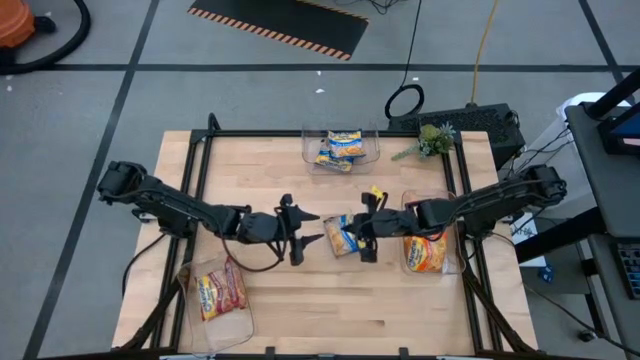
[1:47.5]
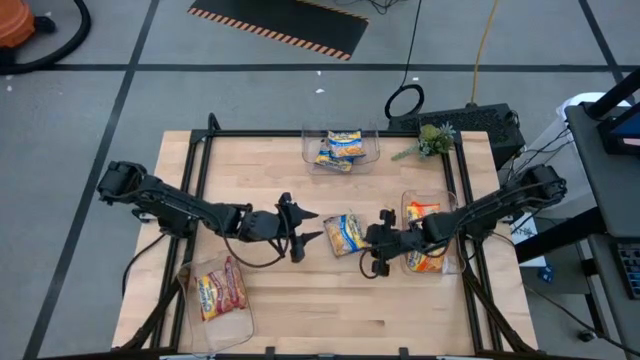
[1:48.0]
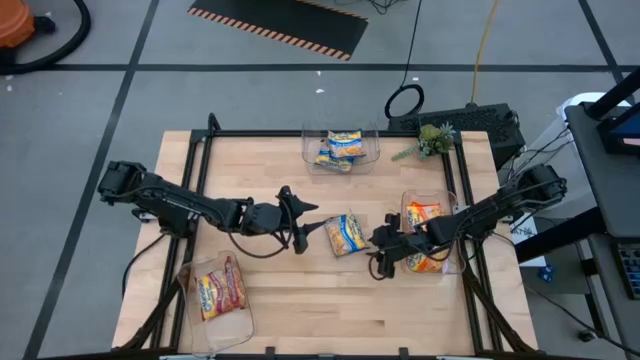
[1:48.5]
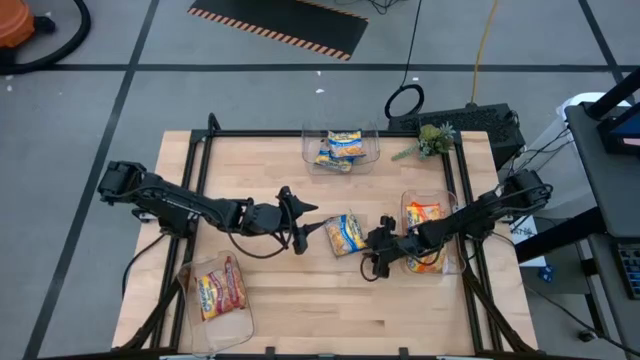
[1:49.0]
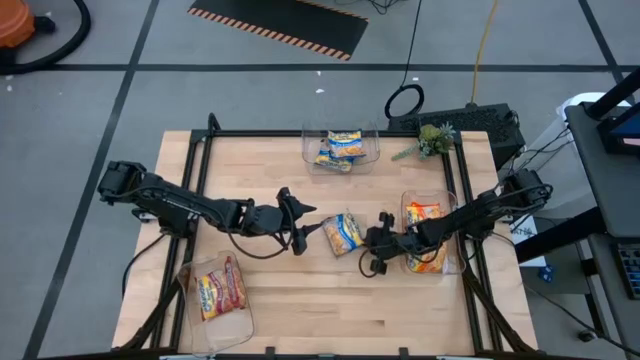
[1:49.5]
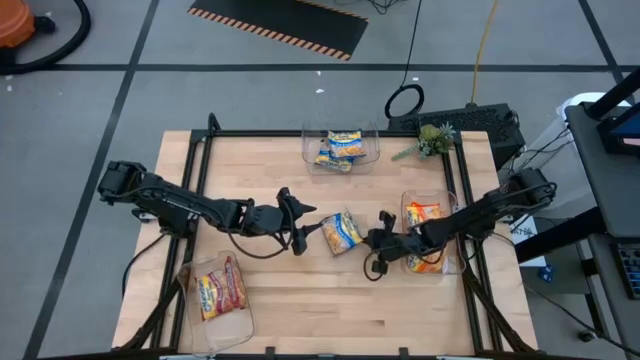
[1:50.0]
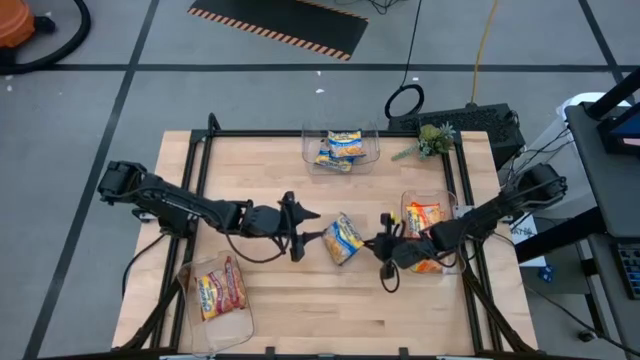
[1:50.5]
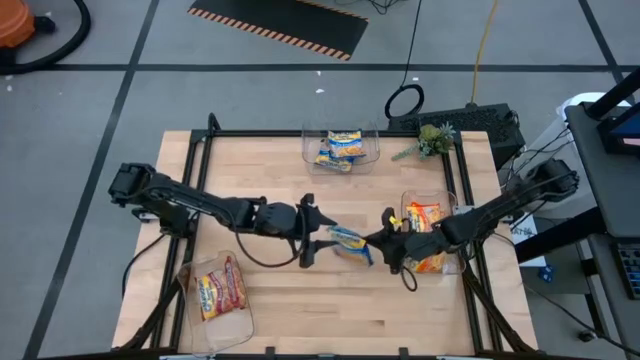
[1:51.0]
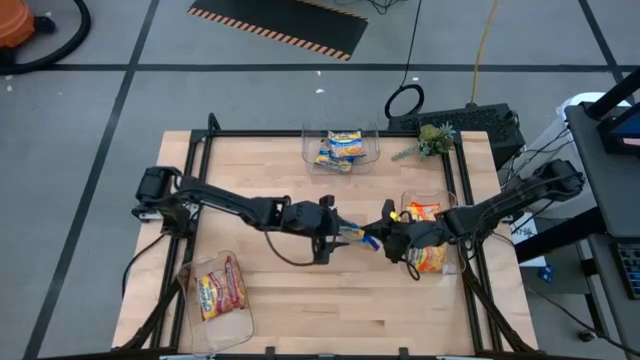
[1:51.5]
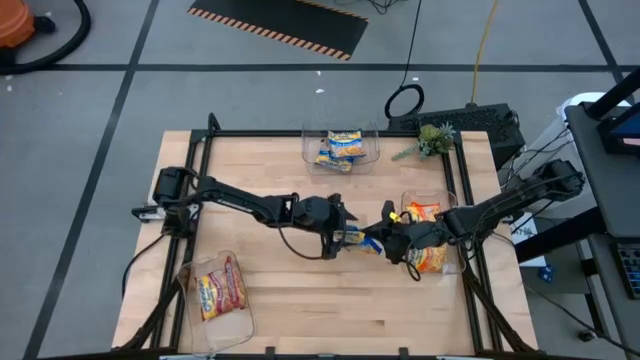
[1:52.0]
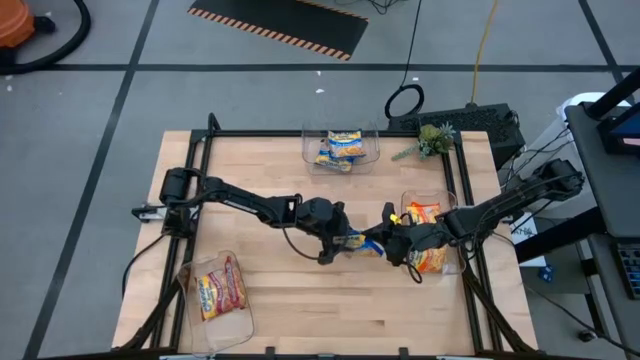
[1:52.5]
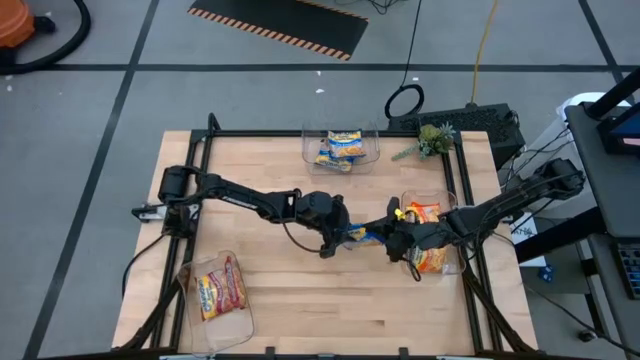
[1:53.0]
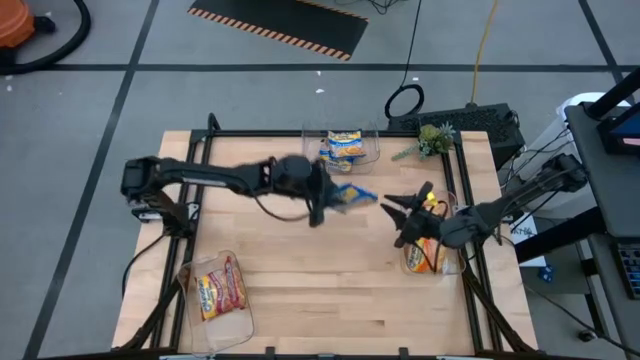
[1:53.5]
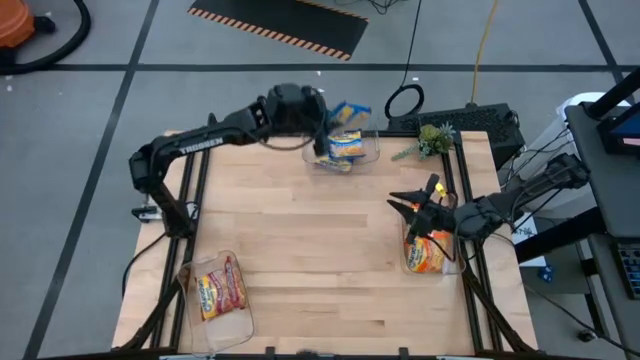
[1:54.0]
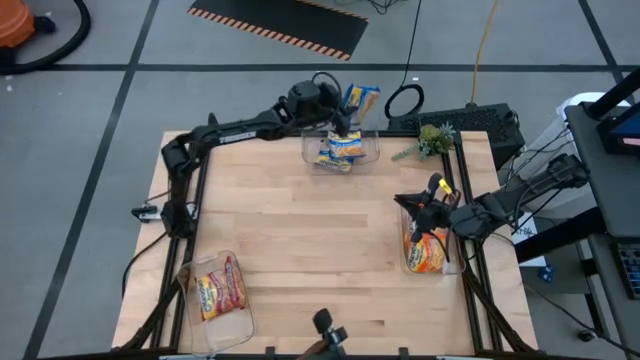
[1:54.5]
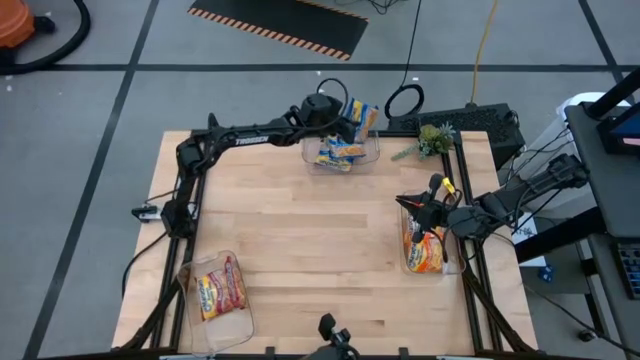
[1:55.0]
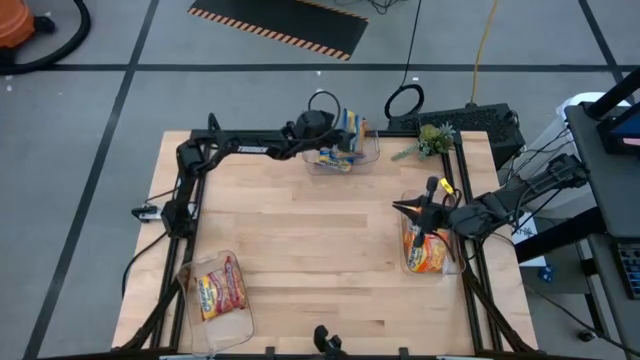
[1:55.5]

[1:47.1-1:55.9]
Task: Sort Maruchan noodles
Put the blue noodle pack into the top transparent bin

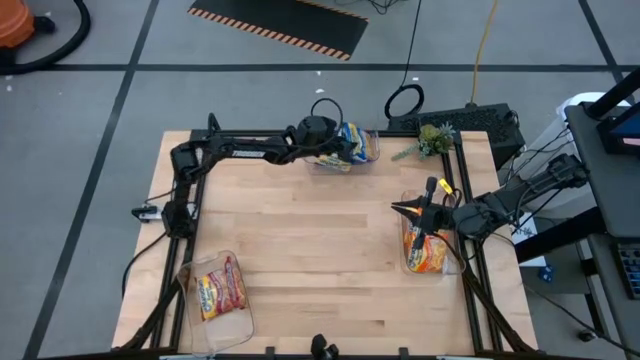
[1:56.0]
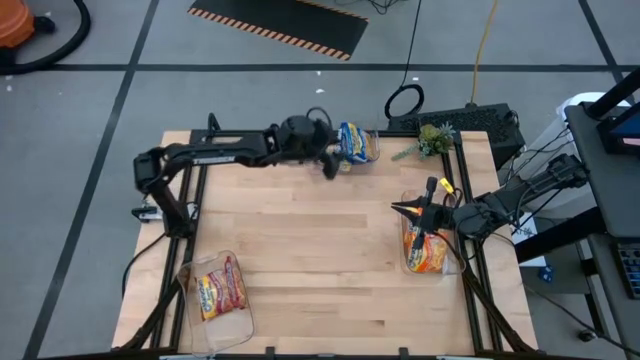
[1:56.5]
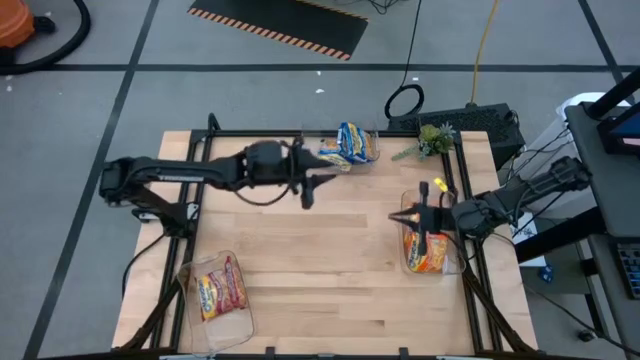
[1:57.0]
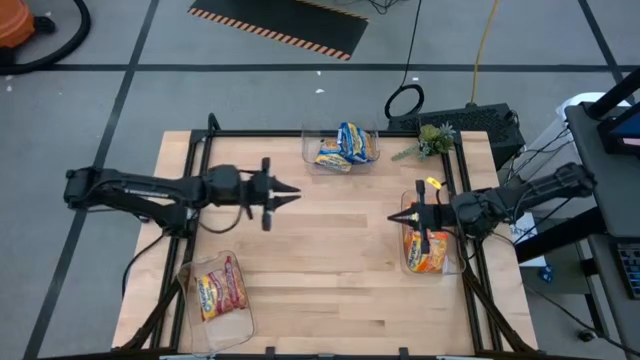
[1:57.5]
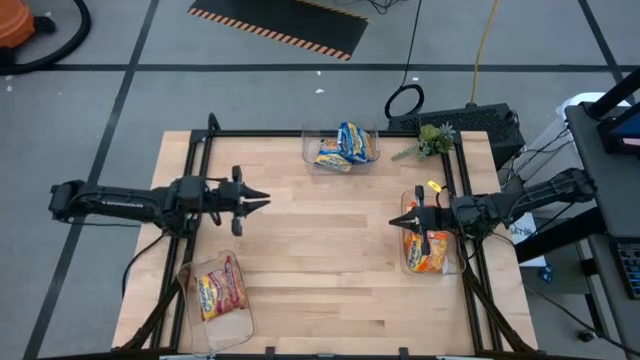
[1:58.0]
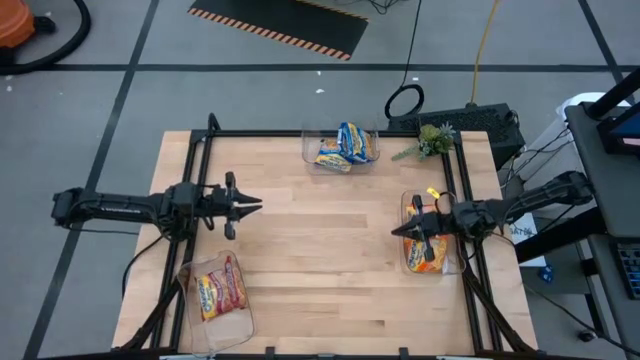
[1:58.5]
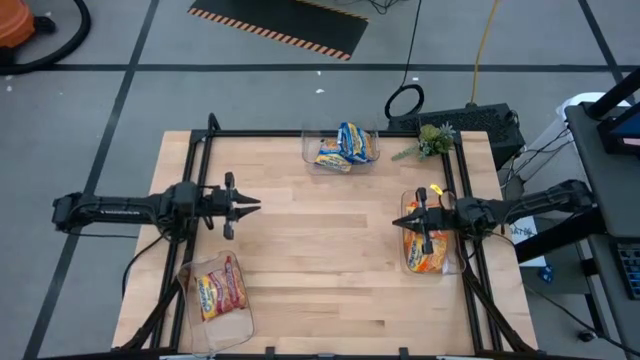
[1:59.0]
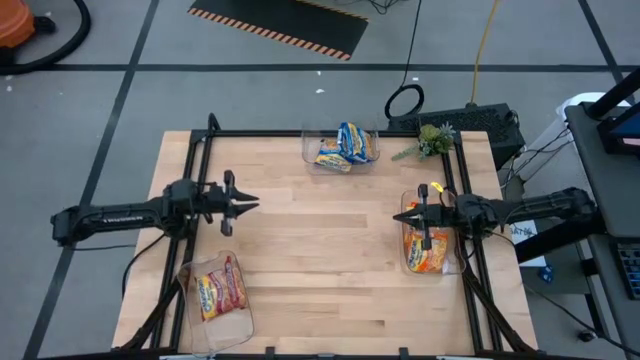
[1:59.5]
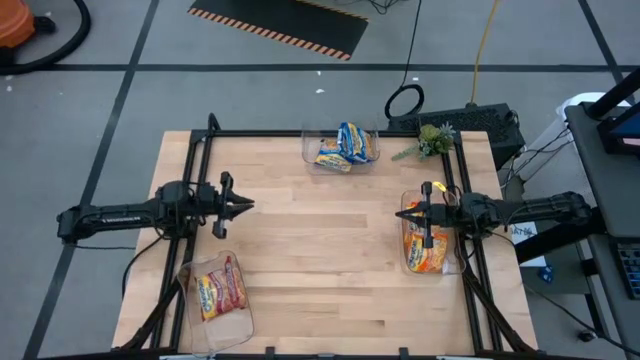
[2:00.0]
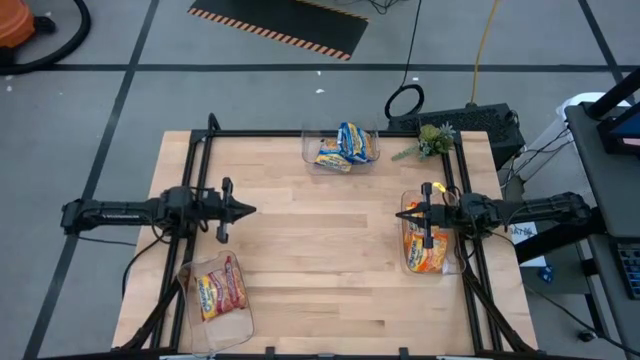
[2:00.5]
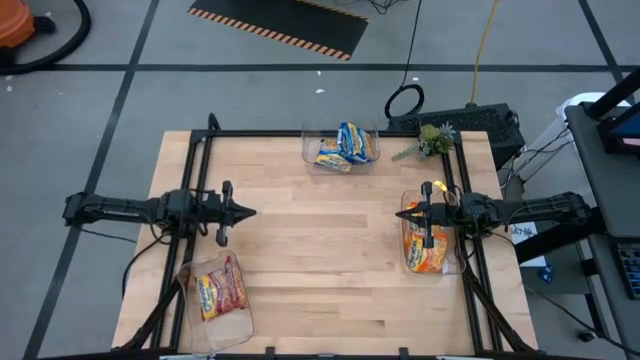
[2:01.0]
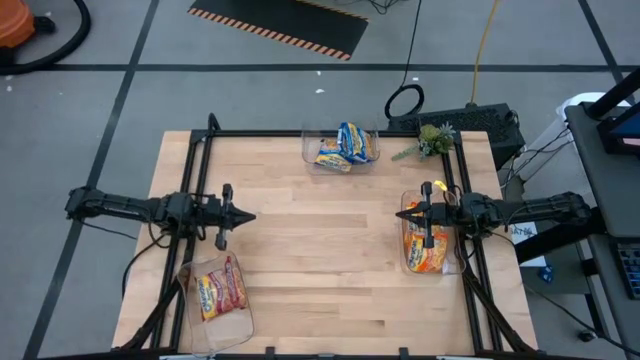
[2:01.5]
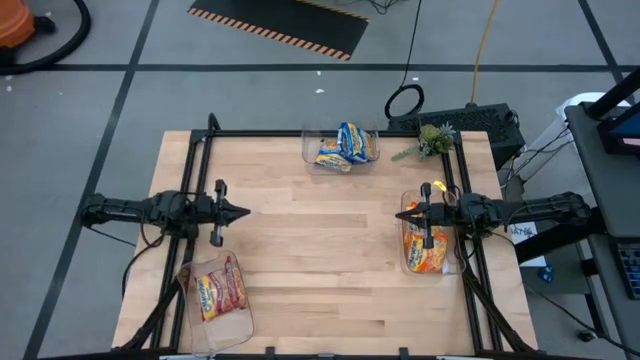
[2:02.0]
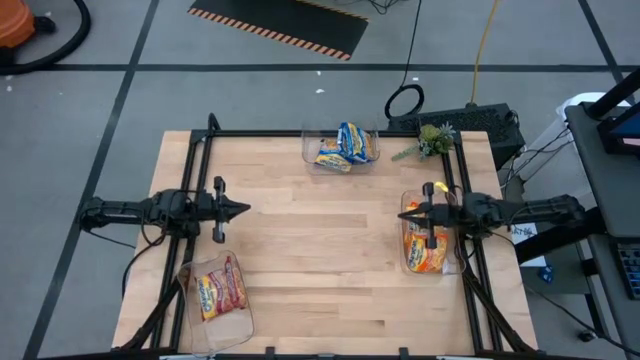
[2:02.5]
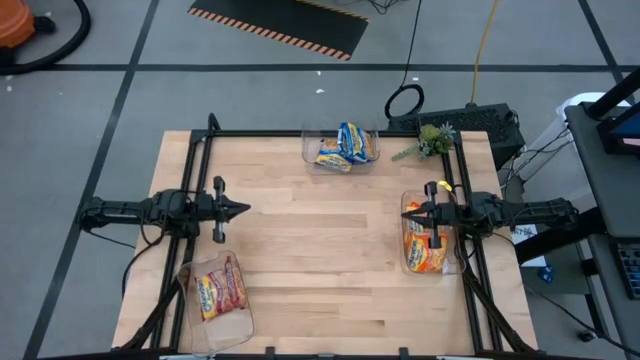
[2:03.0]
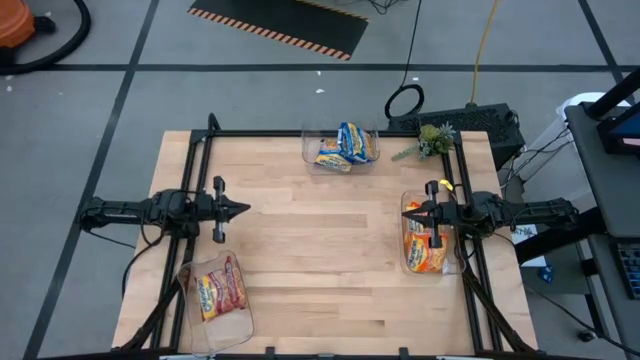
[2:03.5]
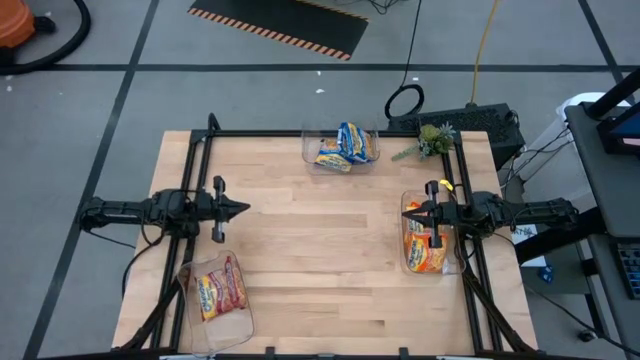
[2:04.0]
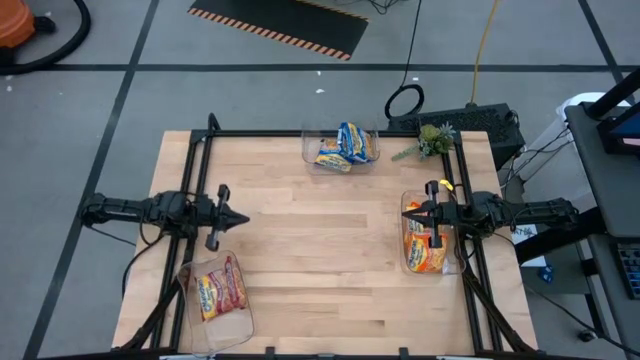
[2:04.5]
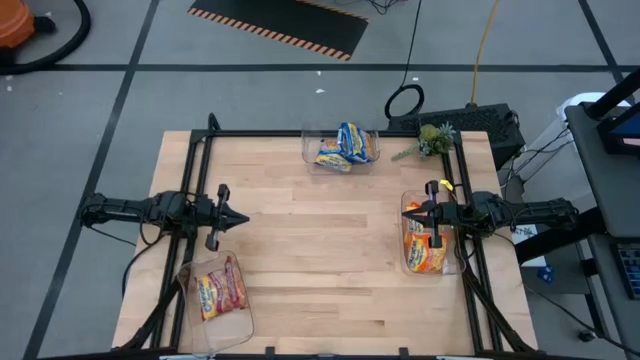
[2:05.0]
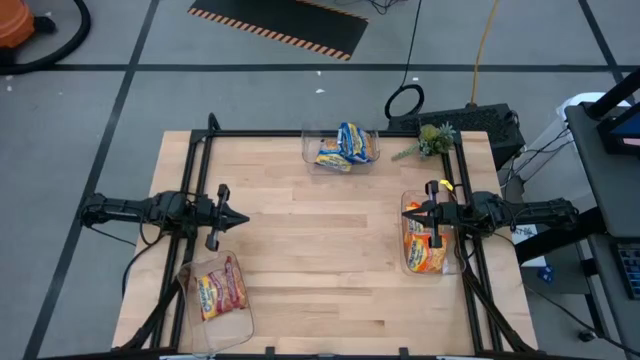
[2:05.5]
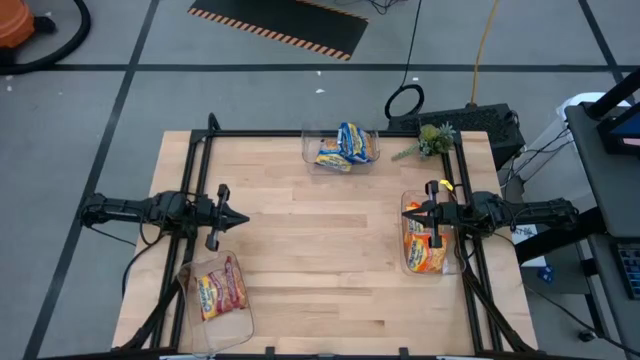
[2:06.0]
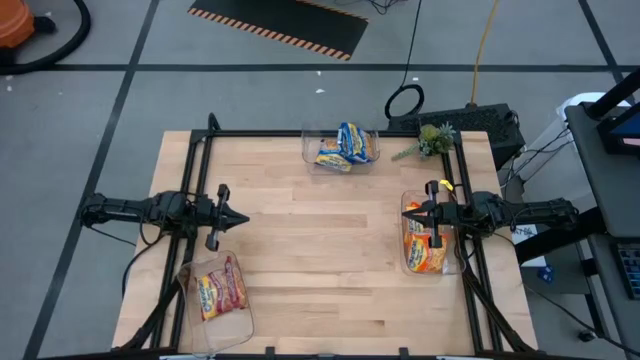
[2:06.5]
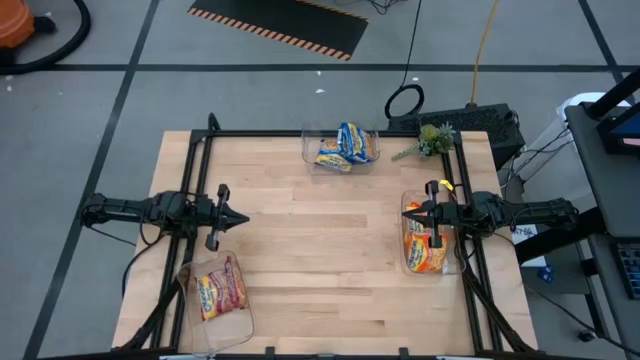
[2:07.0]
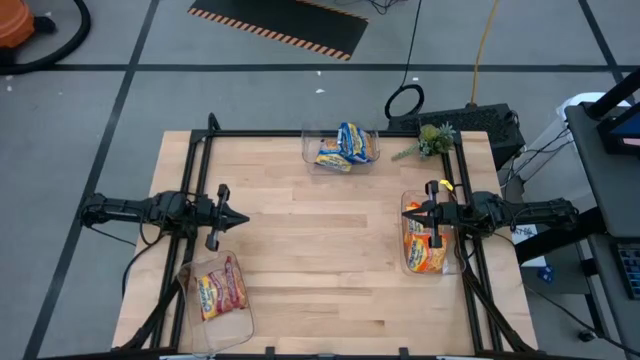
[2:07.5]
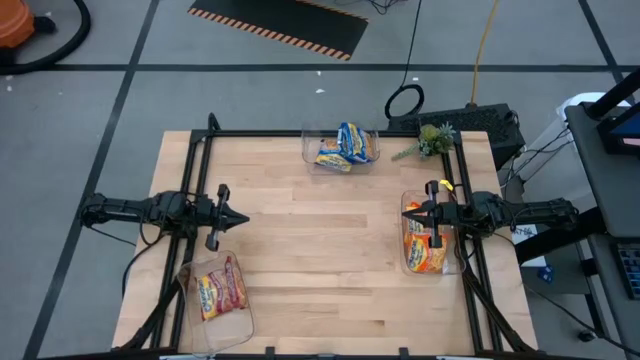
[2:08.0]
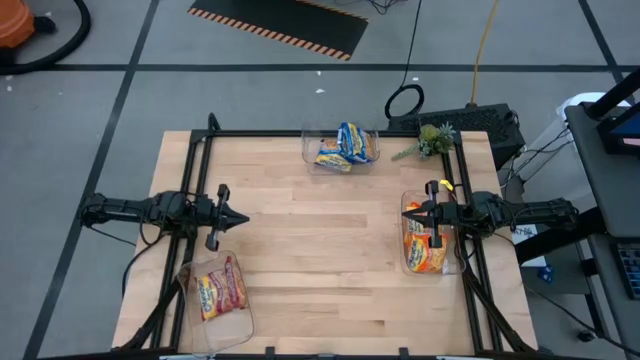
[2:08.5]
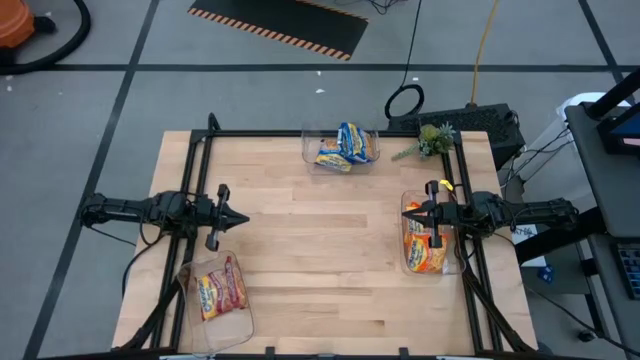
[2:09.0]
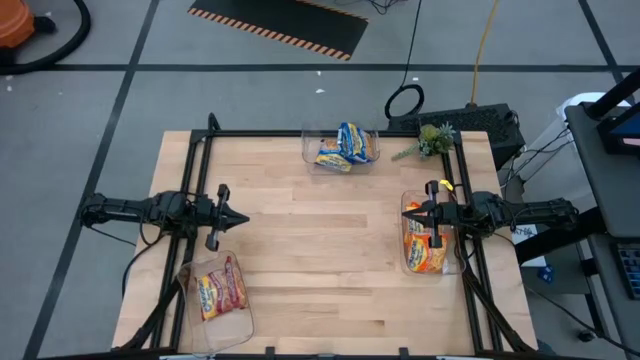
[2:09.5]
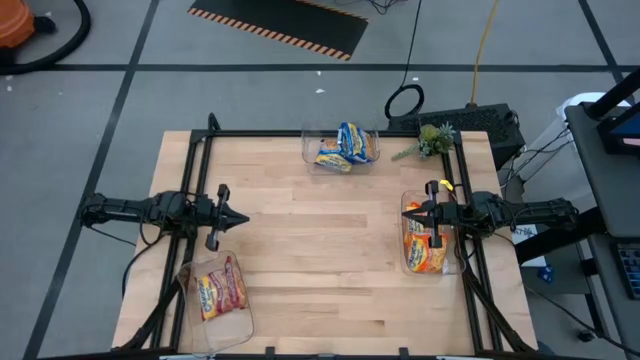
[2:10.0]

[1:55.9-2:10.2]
Return to Home Position
